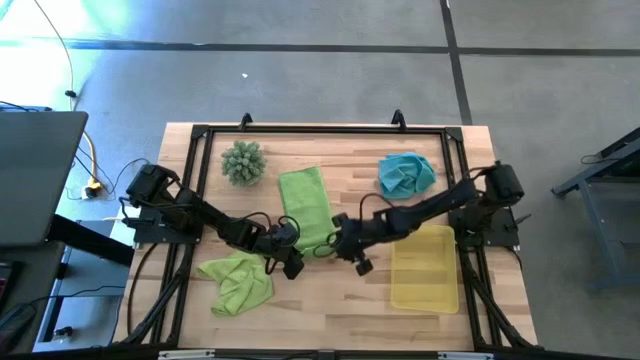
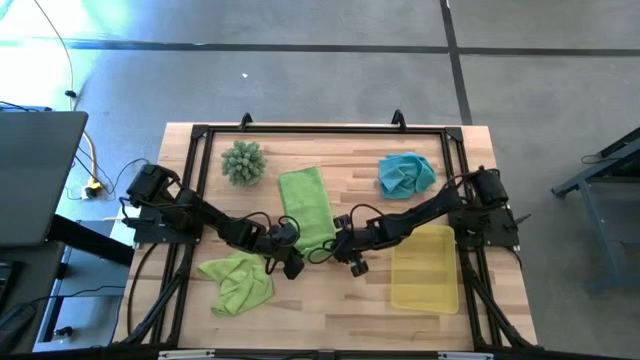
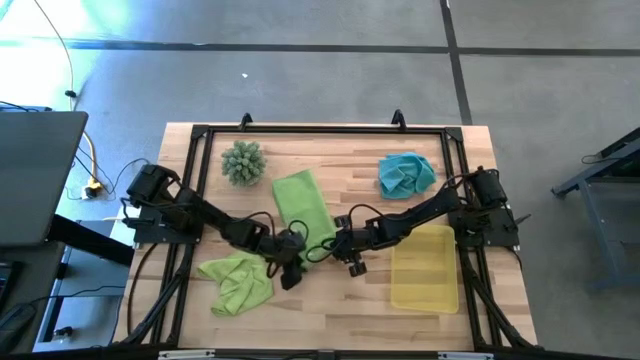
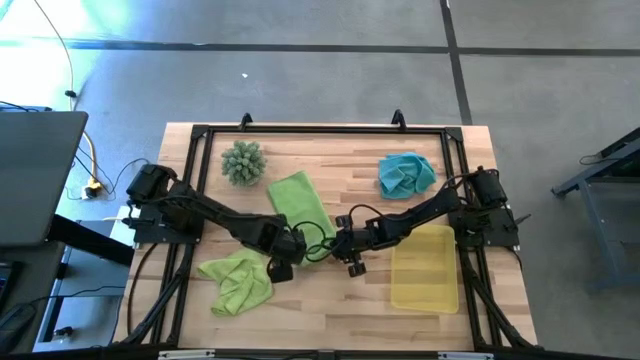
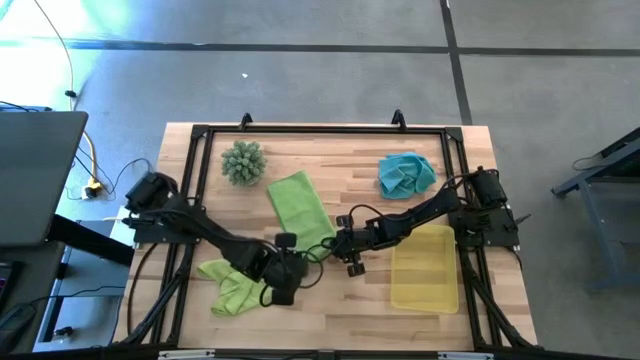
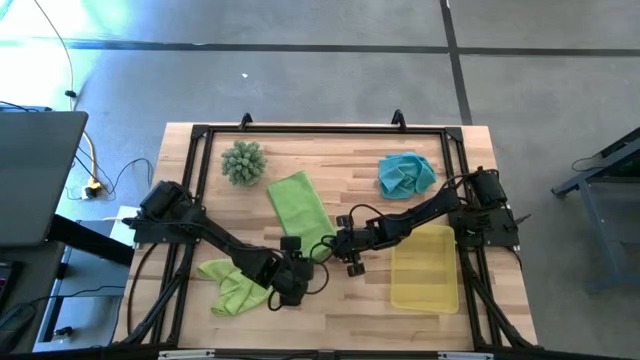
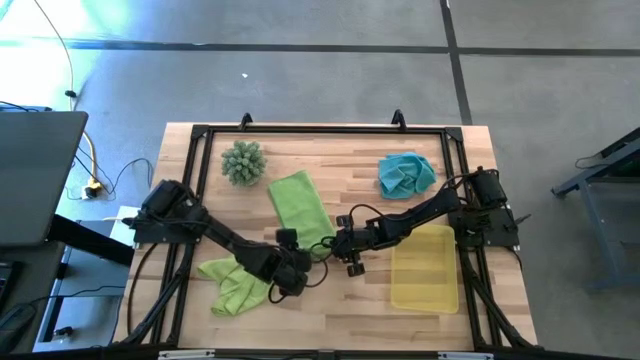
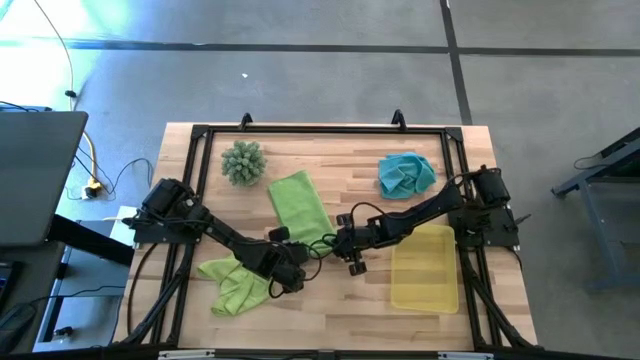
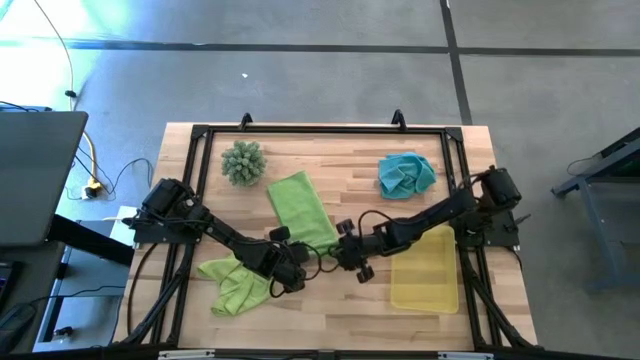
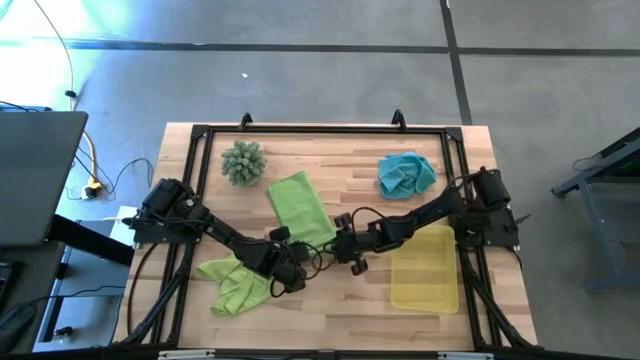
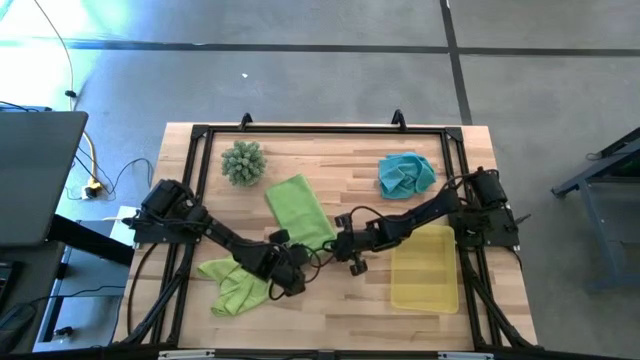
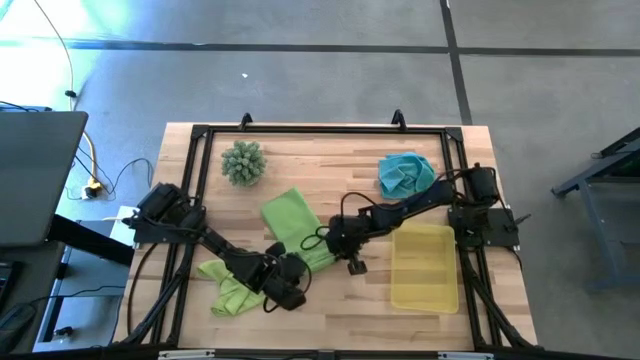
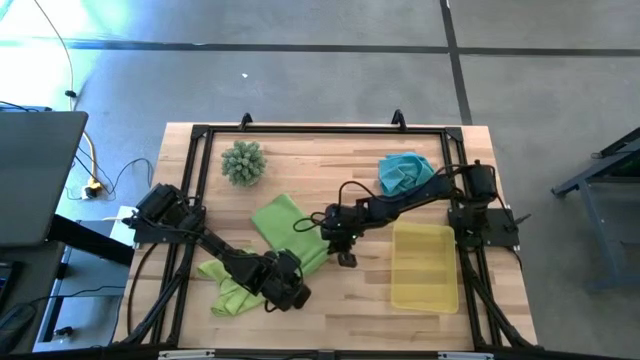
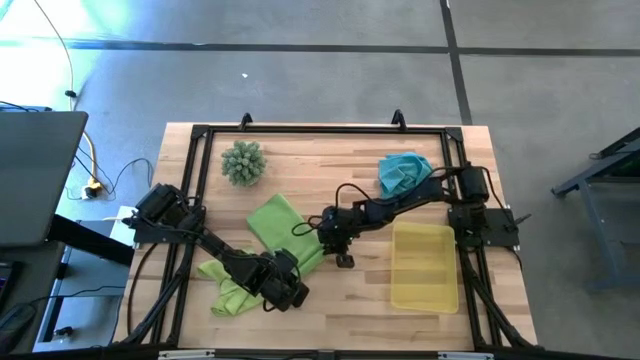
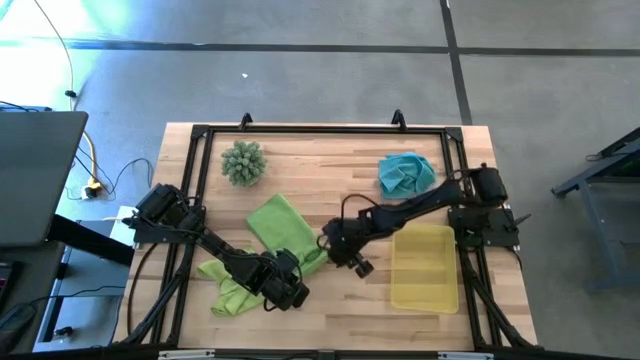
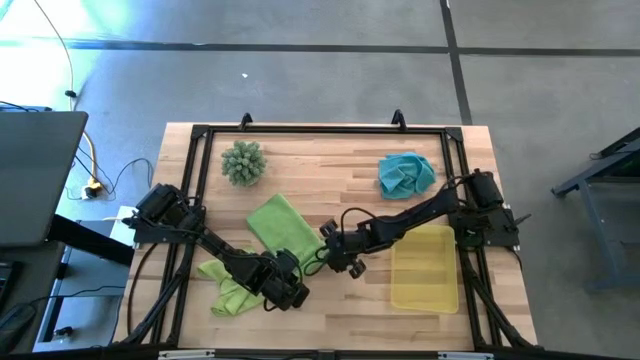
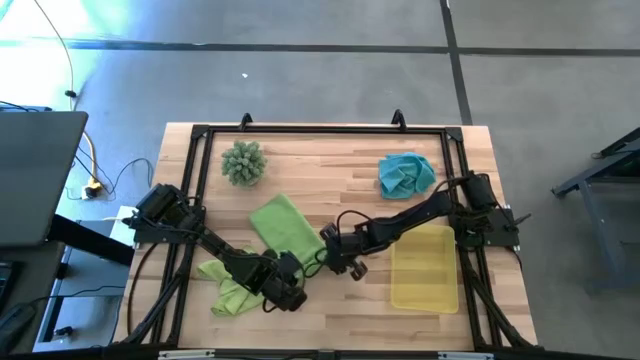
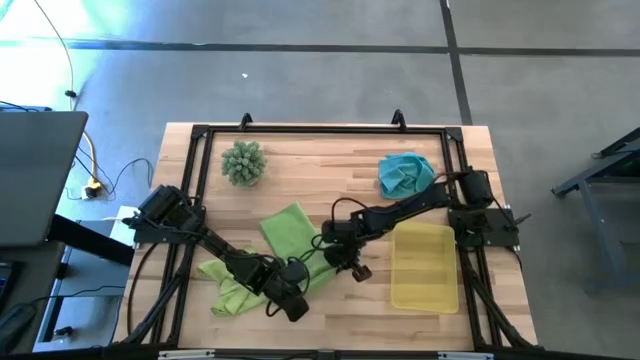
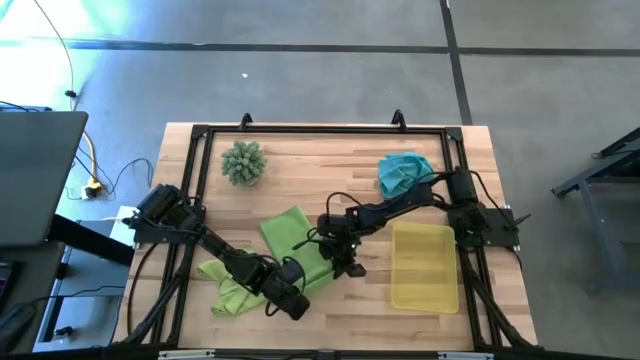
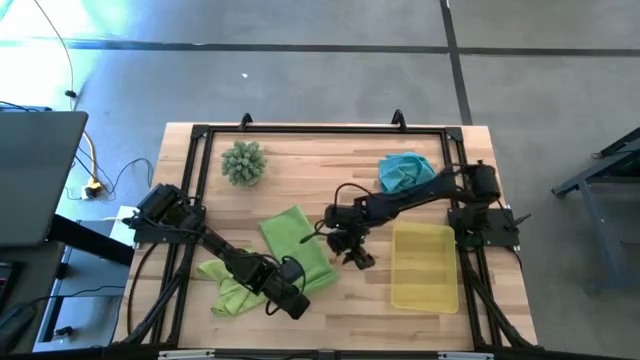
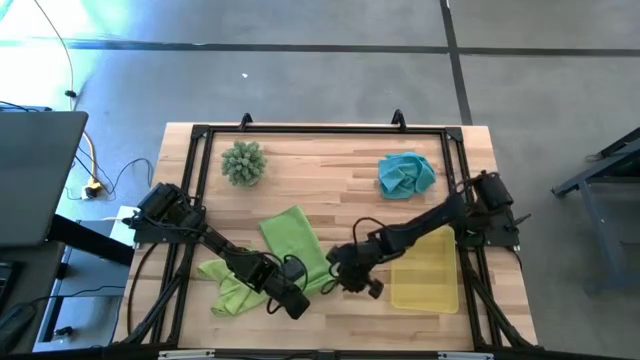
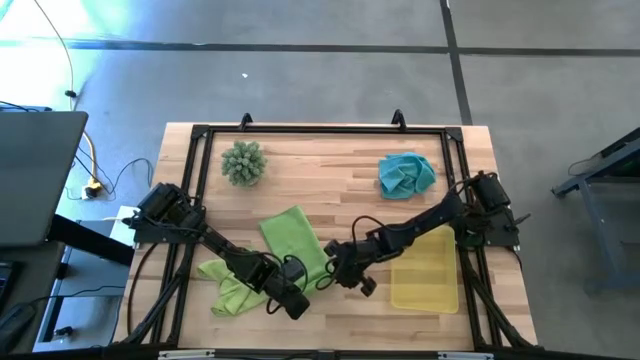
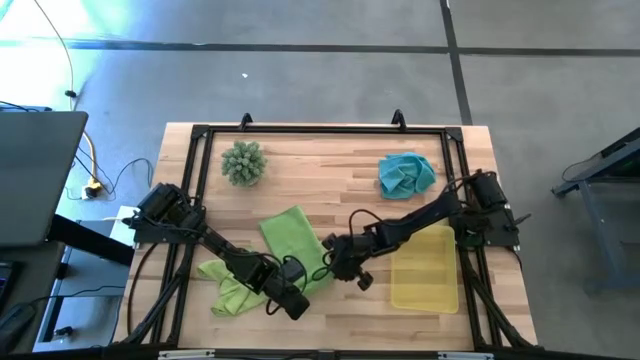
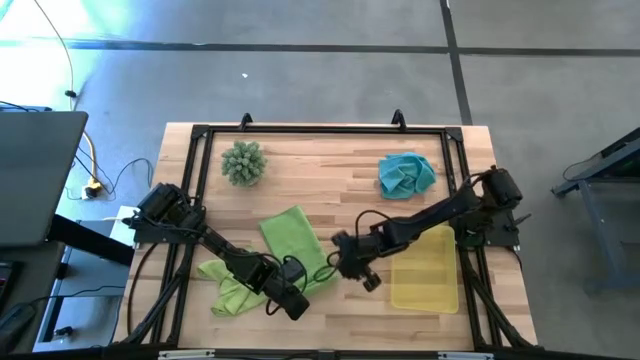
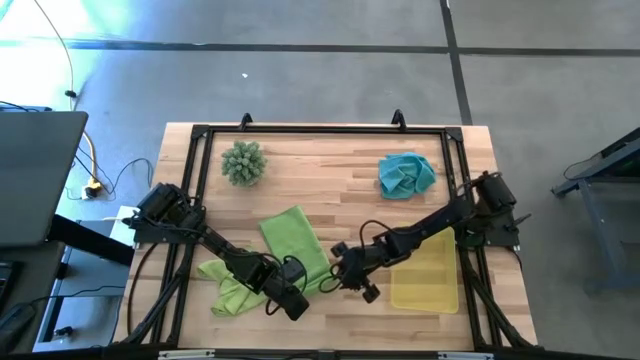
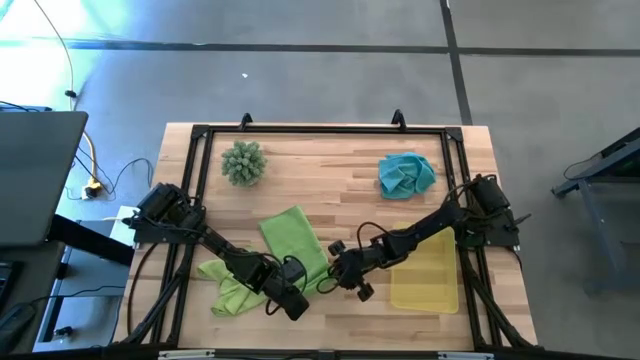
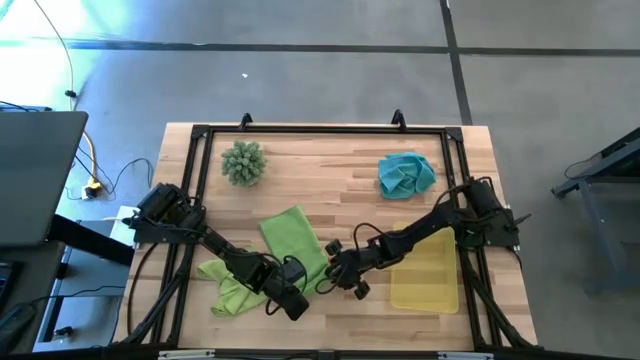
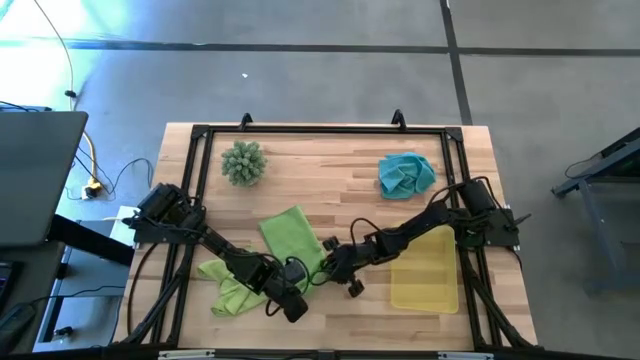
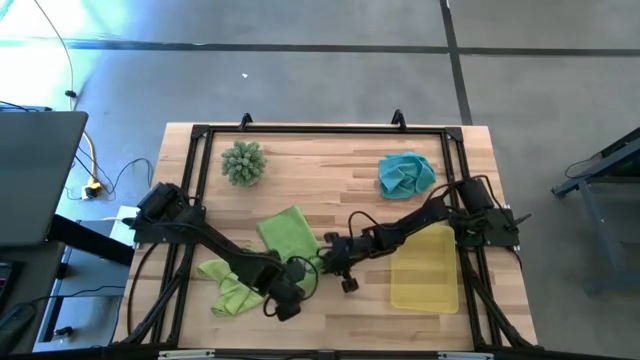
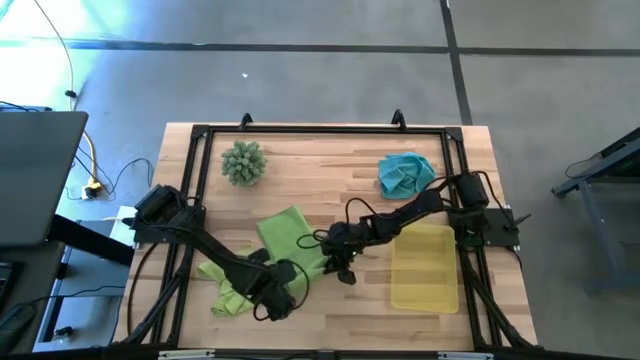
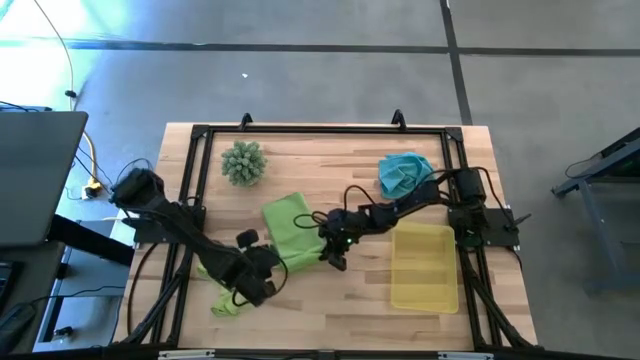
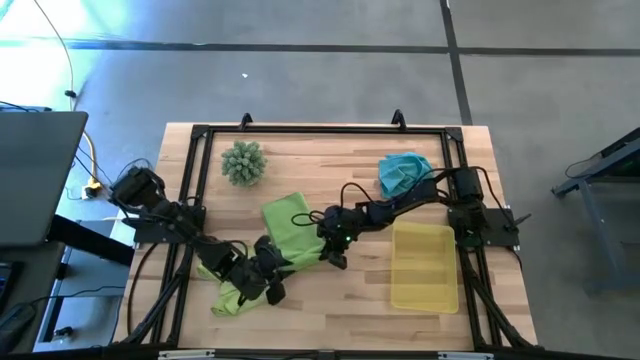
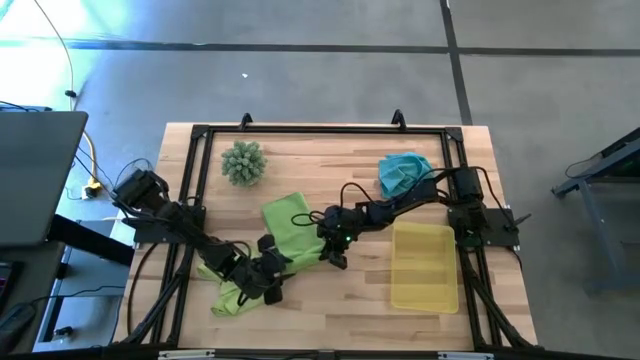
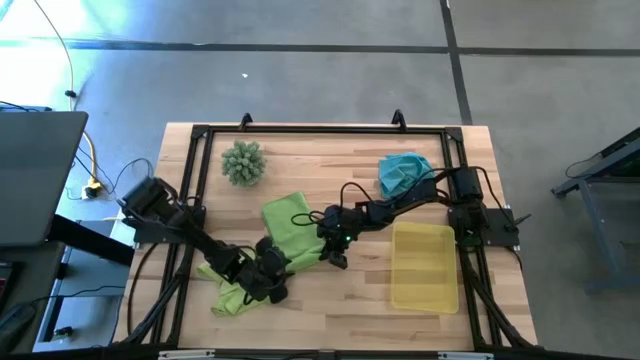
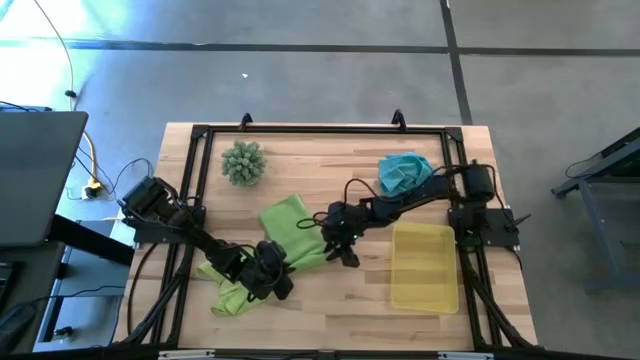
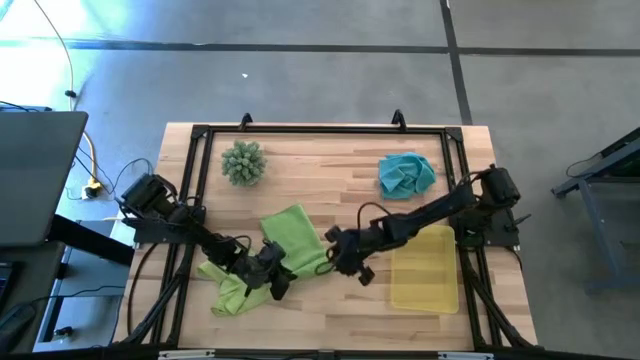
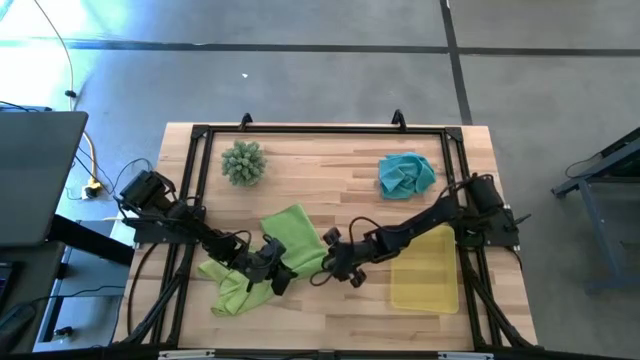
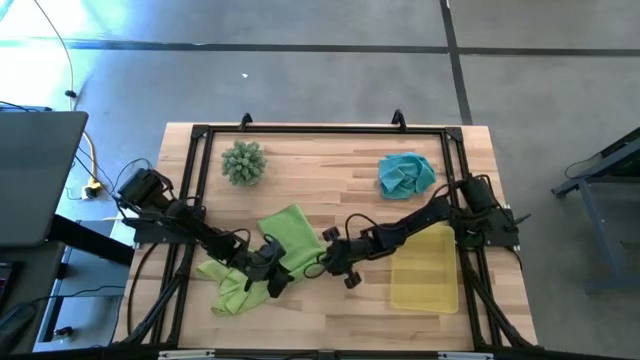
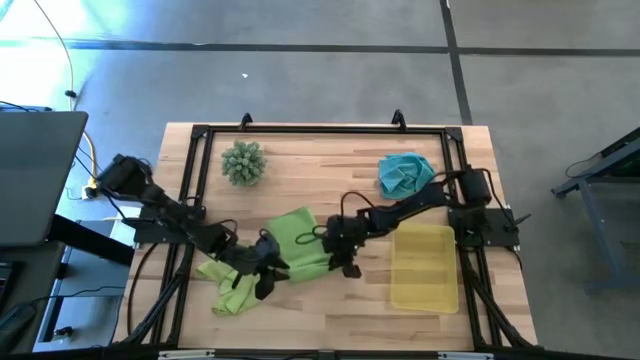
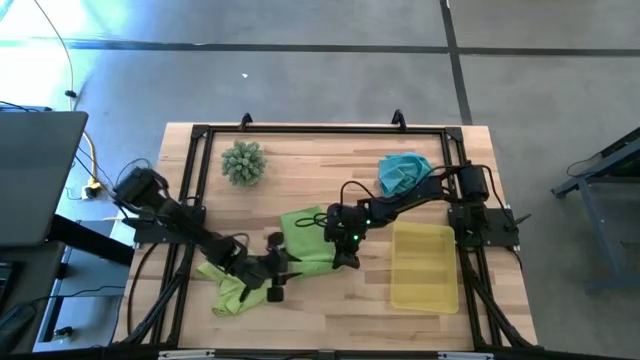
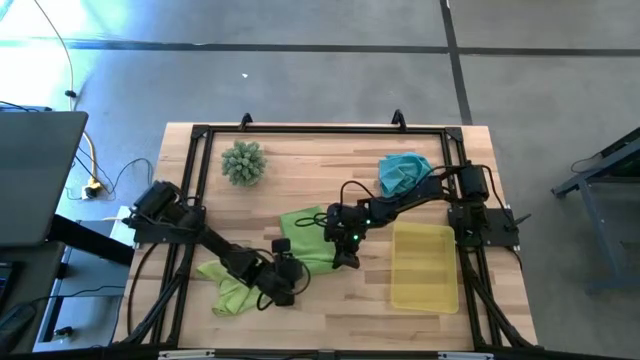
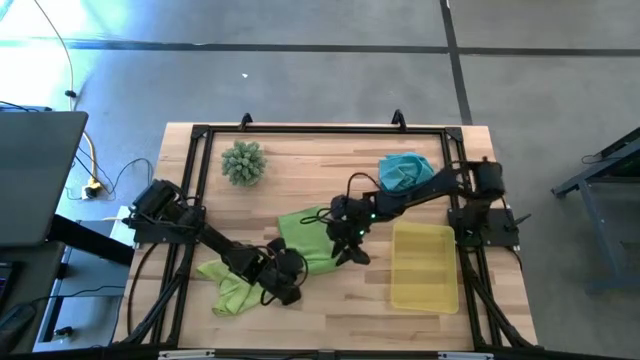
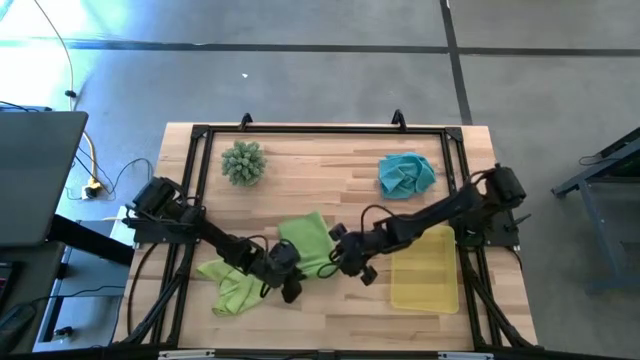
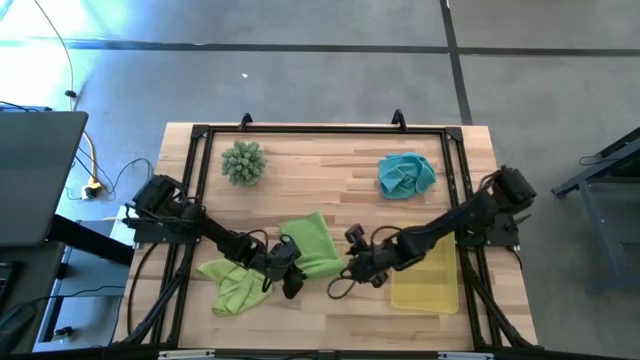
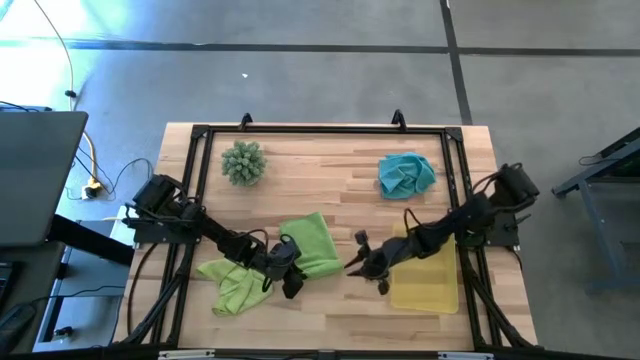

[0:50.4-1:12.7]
Task: Roll microfiber towels into tight, uniform cylinder then place into a basket
Roll the green cloth
